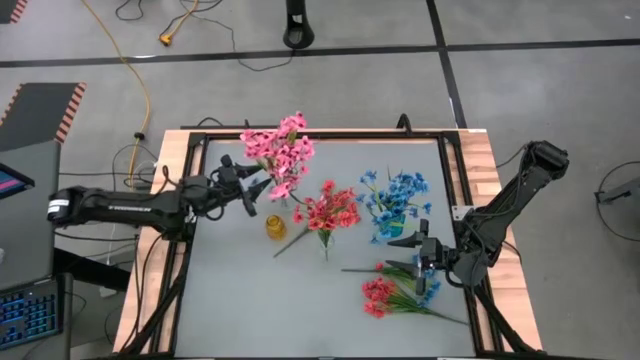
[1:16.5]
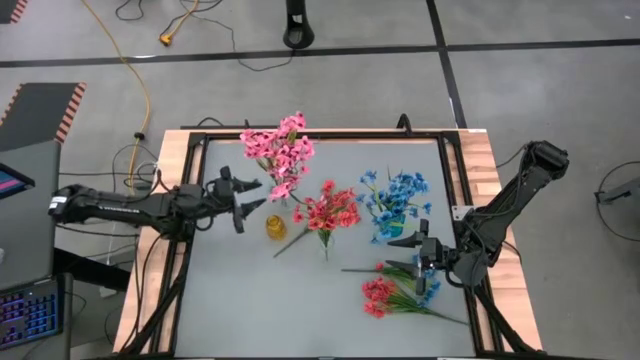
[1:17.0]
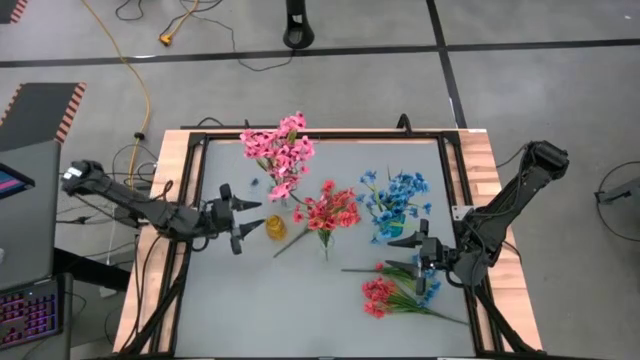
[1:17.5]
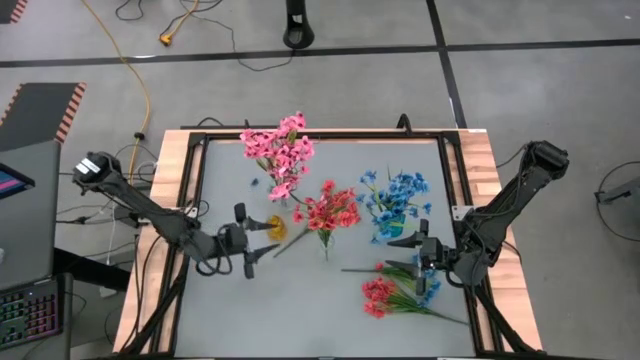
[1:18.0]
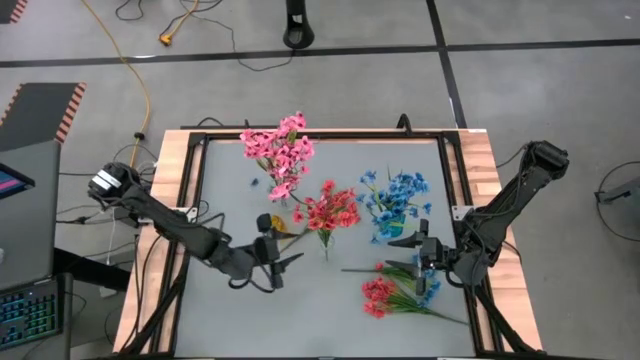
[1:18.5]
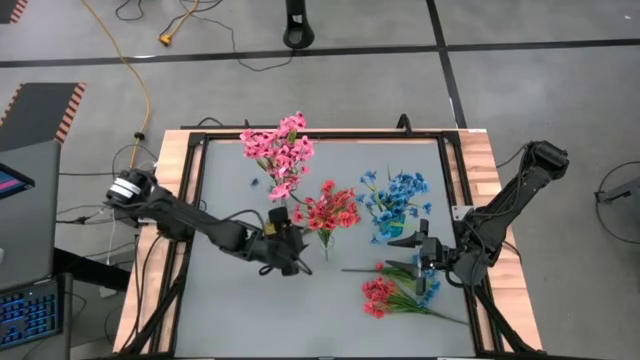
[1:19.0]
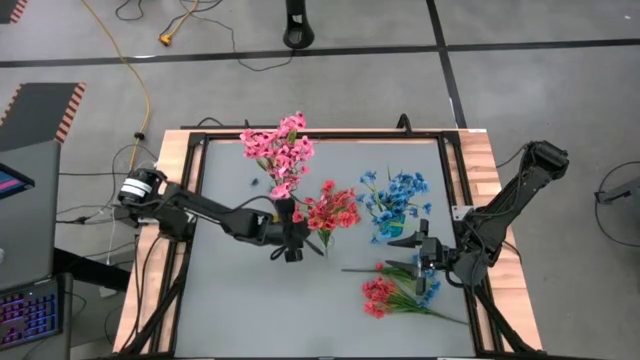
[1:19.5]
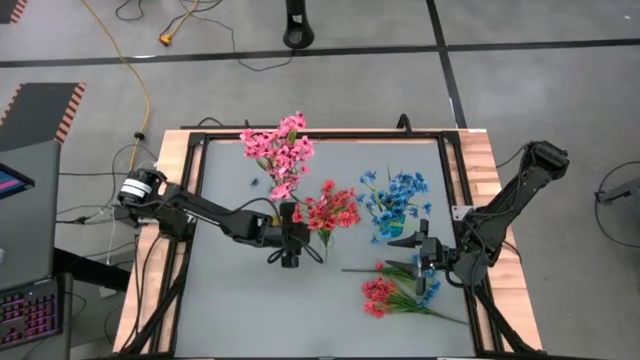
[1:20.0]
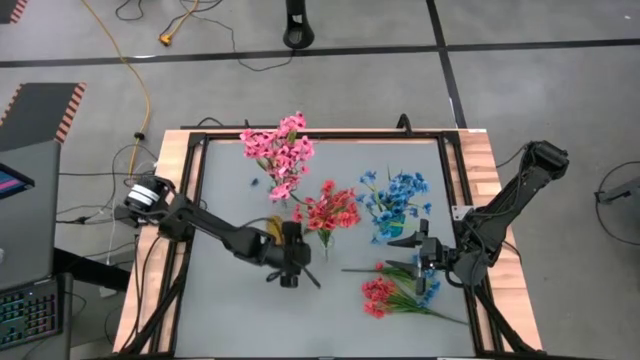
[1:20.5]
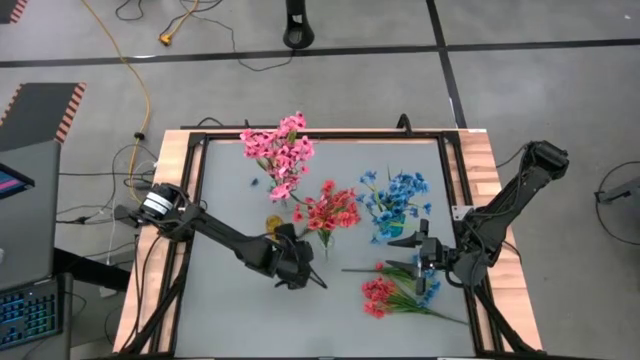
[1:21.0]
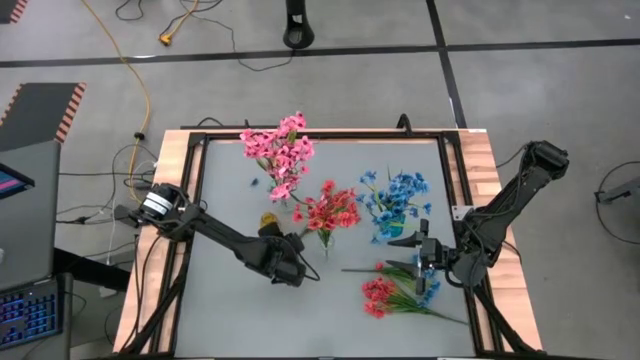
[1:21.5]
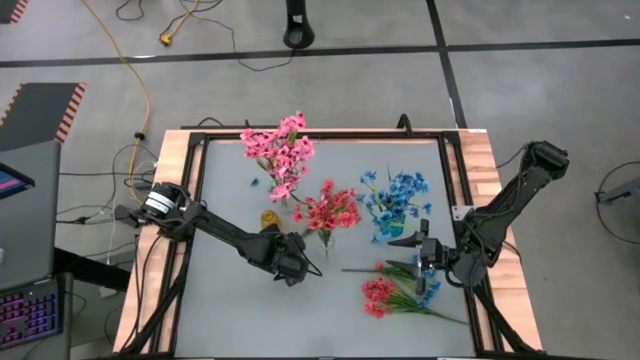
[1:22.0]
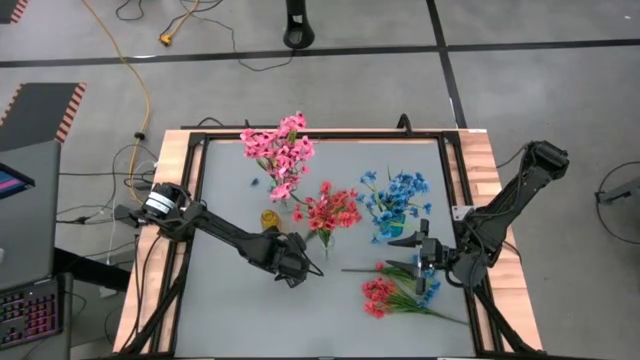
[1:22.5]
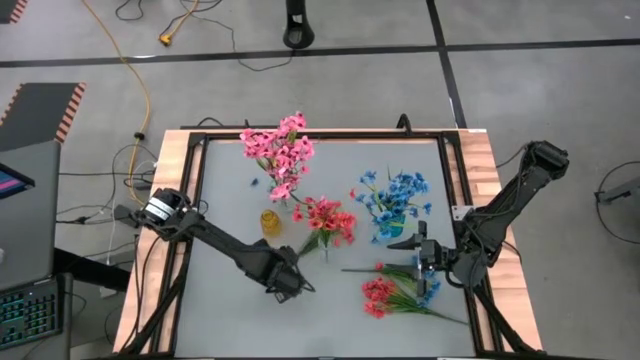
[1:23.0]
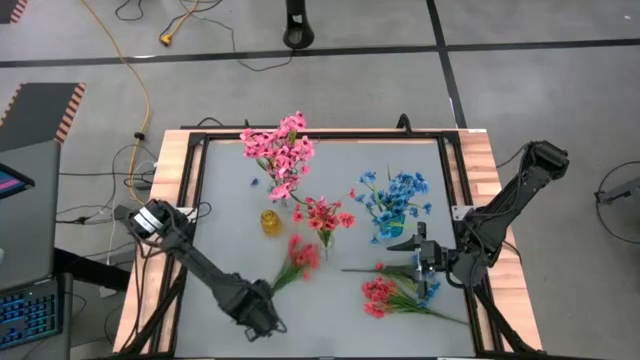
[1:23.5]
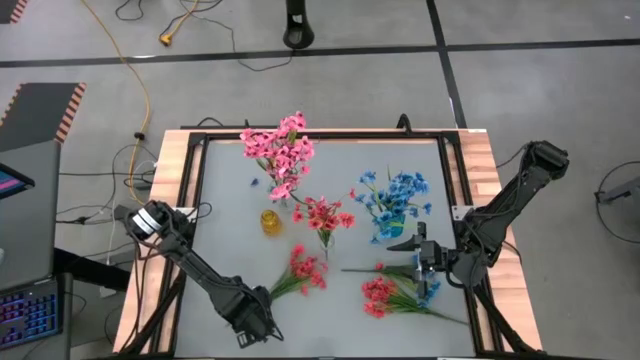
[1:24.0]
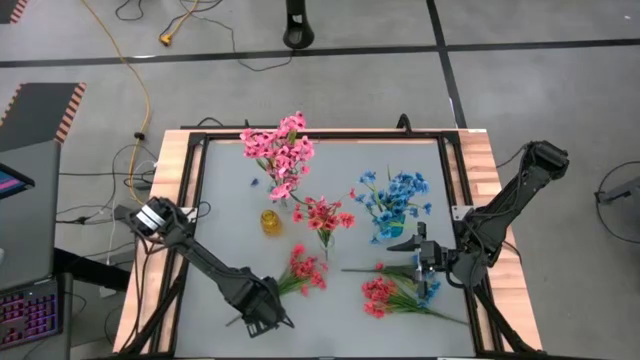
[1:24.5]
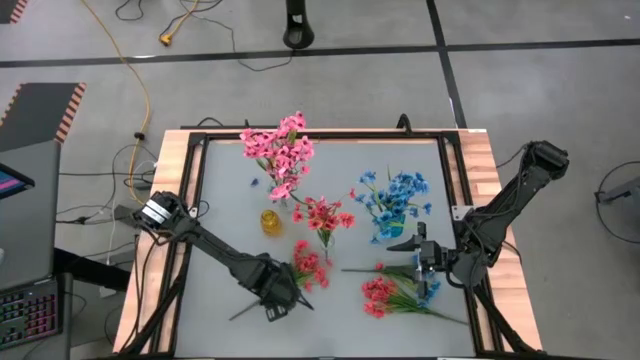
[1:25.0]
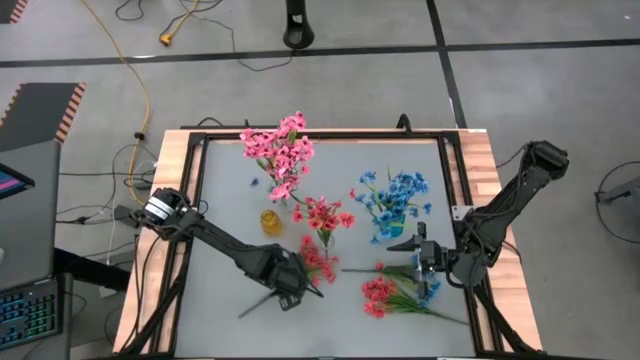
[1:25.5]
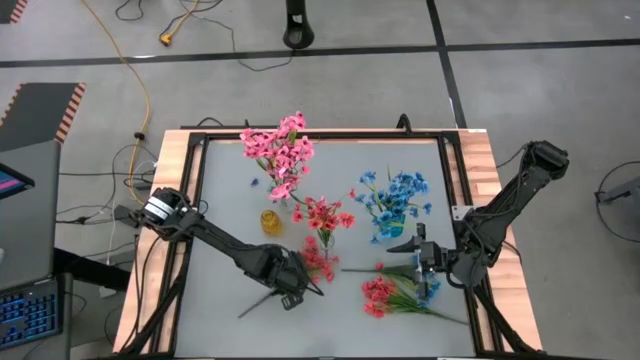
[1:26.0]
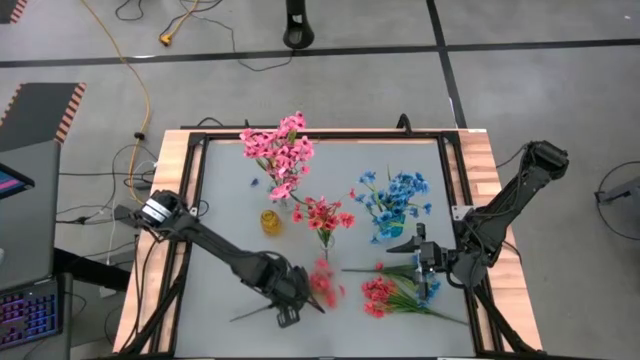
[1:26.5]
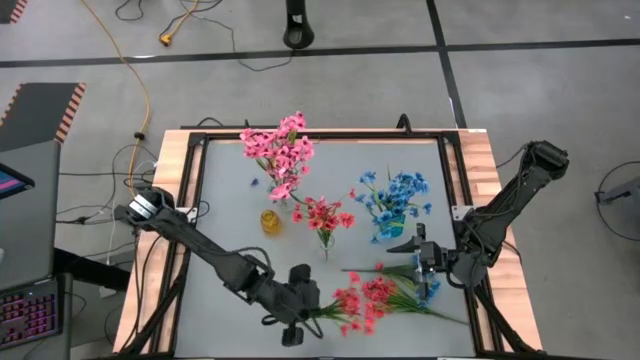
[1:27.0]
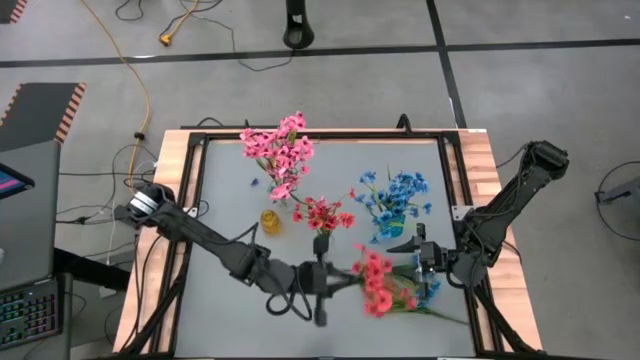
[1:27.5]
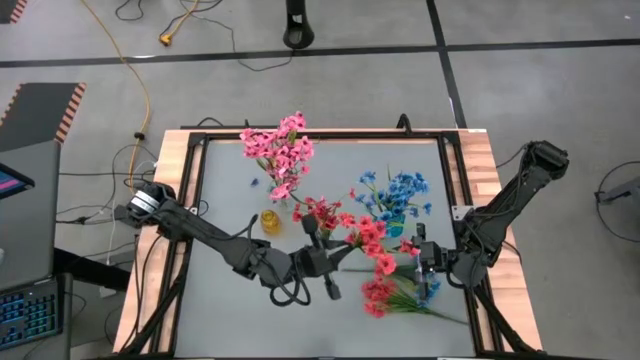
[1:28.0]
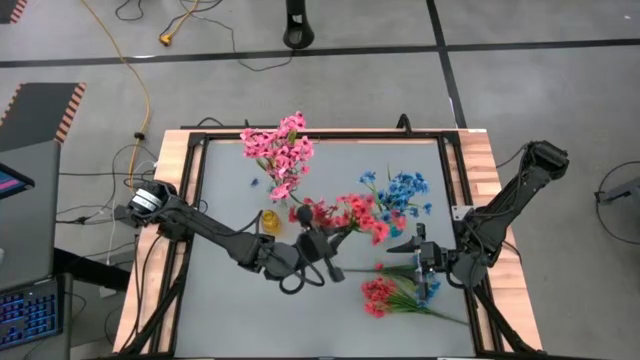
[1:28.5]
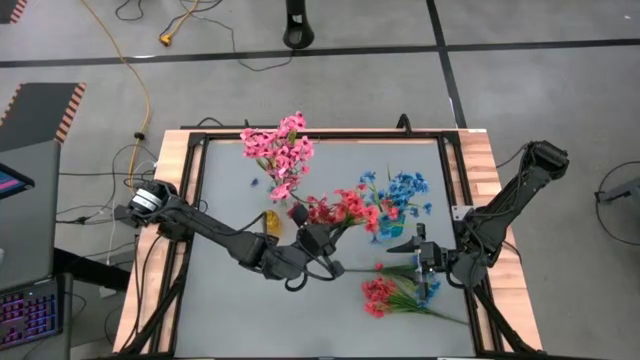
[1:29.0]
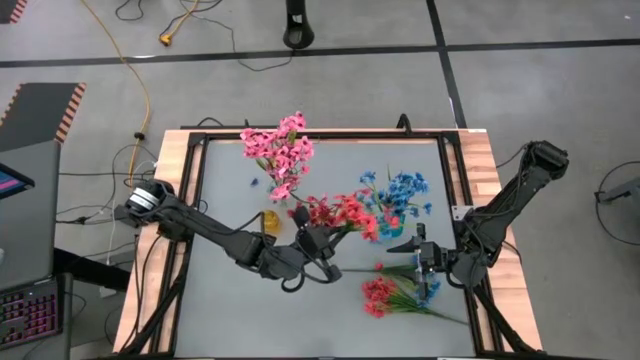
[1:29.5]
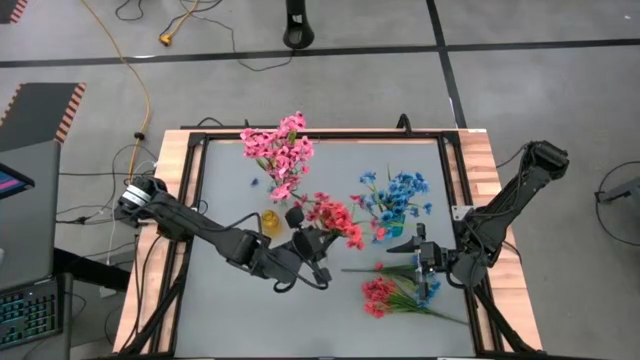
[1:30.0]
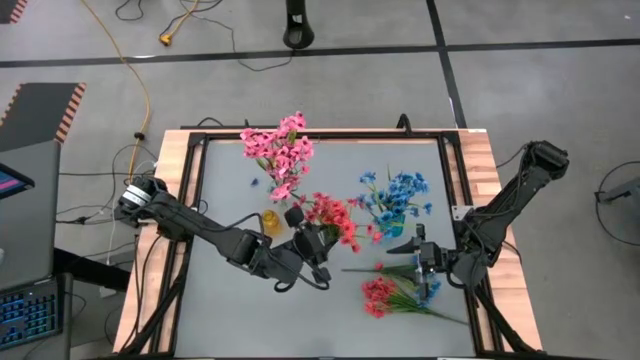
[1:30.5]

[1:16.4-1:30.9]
Task: Sort flowers into vase by color
Put the top red flowers into the bottom transparent vase

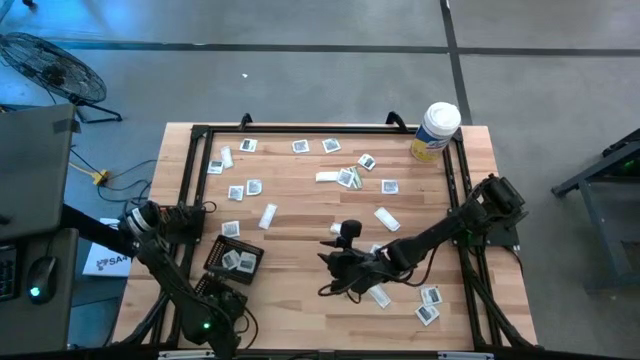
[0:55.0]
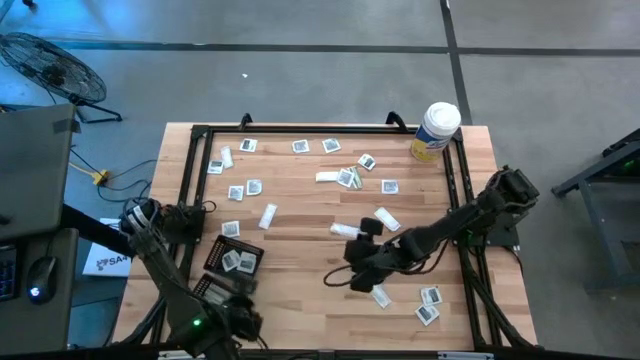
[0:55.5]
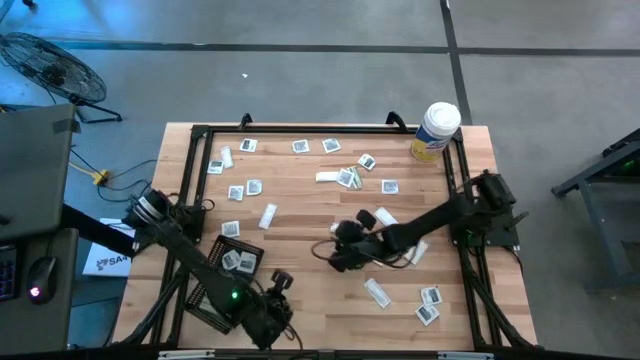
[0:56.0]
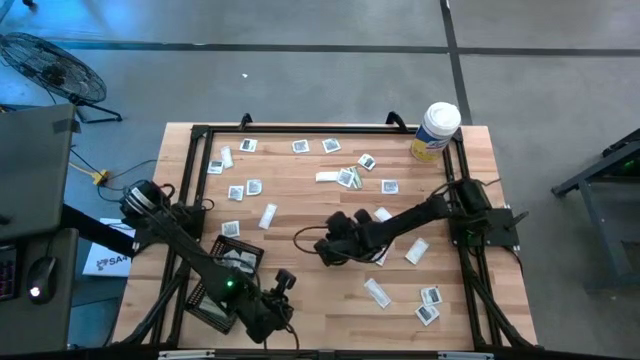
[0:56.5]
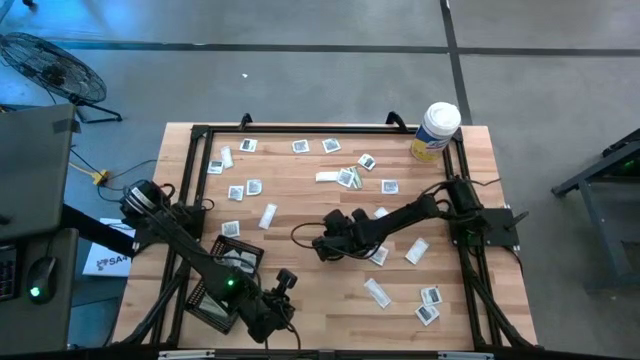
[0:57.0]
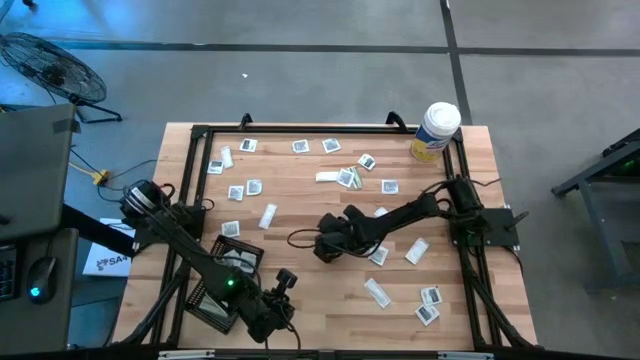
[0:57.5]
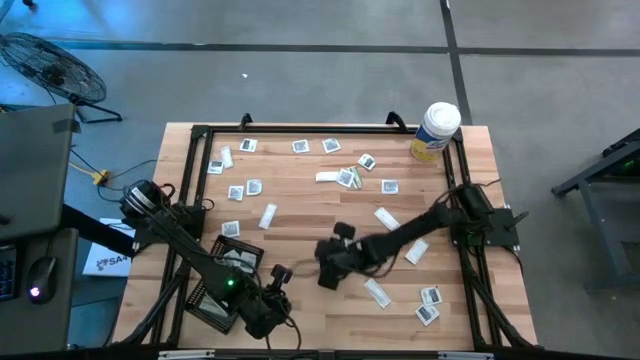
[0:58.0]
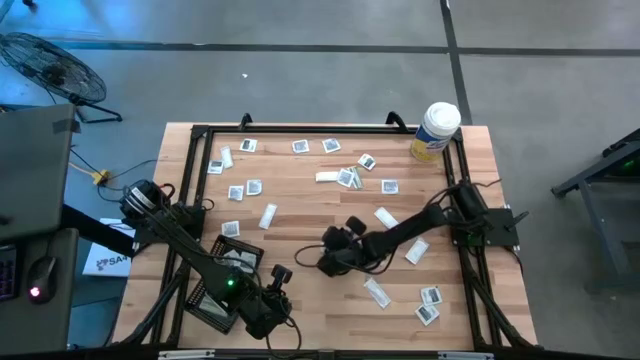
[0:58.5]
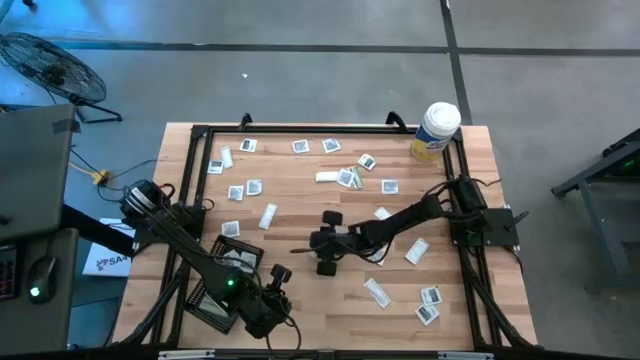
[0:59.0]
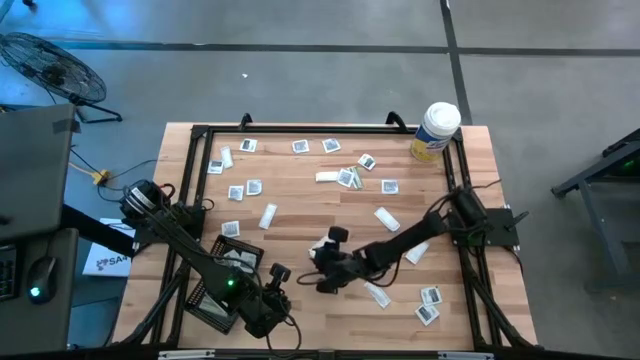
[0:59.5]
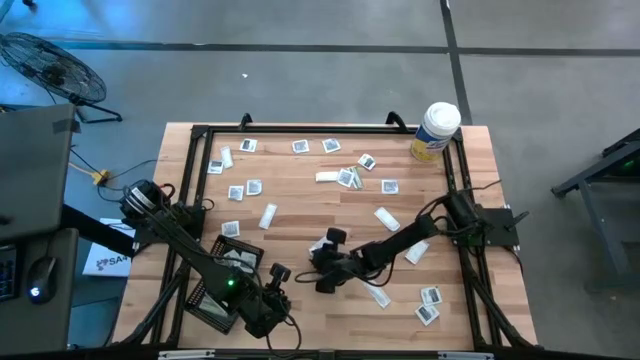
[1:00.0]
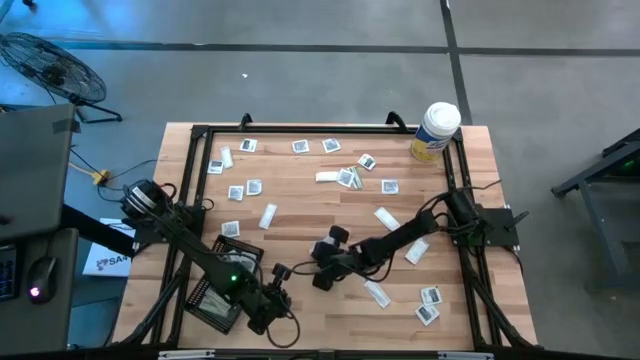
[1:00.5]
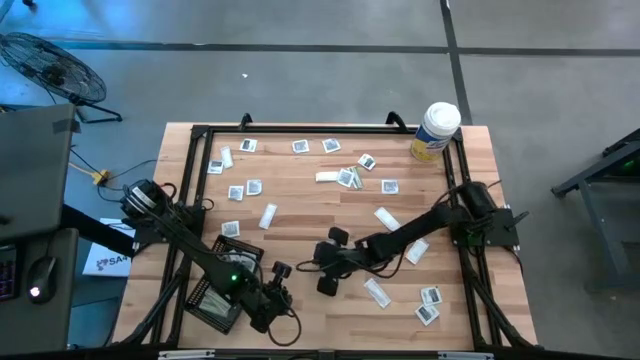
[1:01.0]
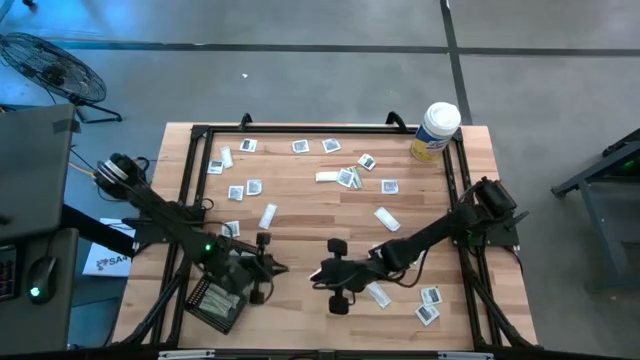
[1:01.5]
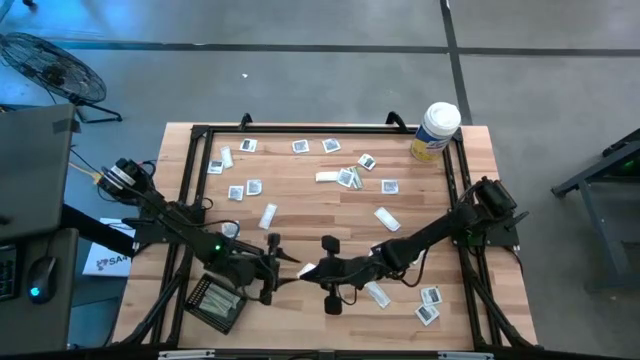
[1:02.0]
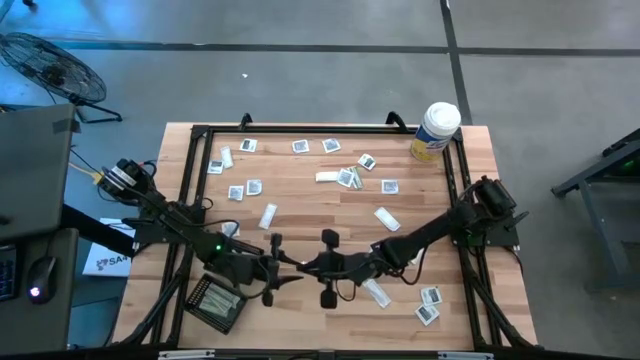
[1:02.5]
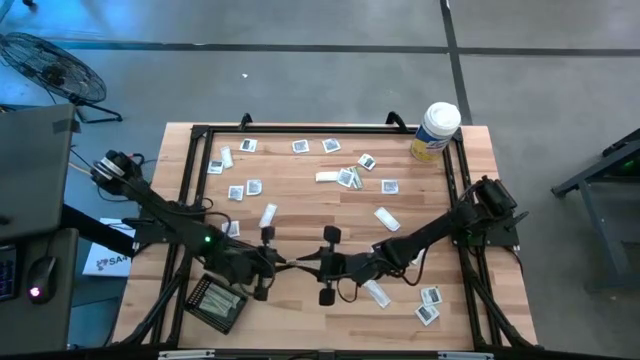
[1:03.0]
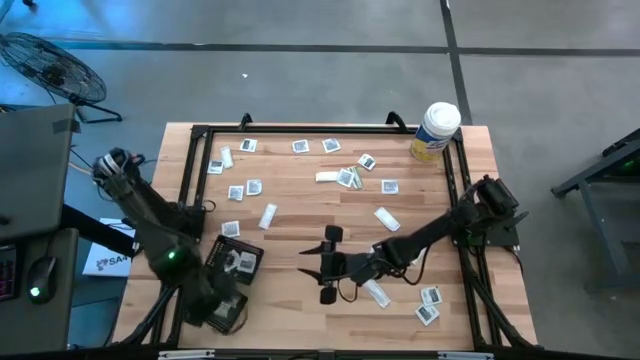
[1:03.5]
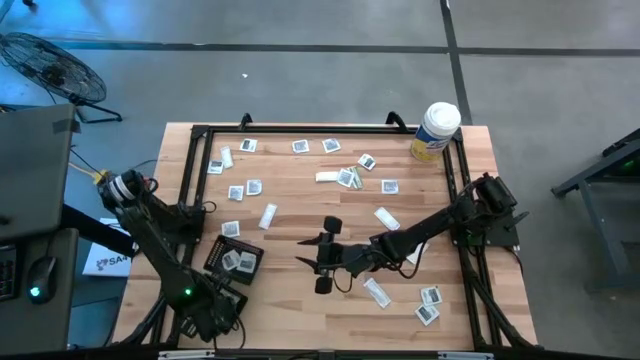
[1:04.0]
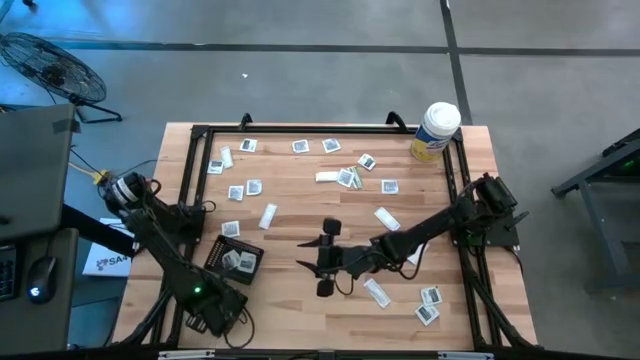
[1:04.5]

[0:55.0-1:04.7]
Task: Pick & Place First Aid Supplies
Put the bandage into the bottom black bin
